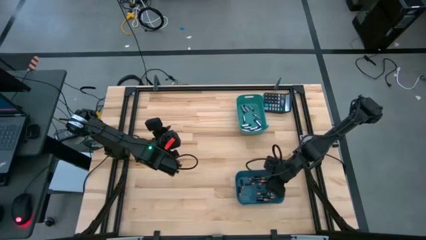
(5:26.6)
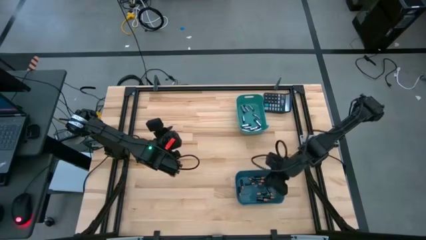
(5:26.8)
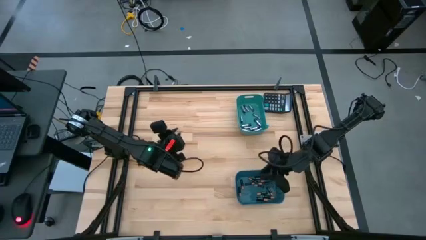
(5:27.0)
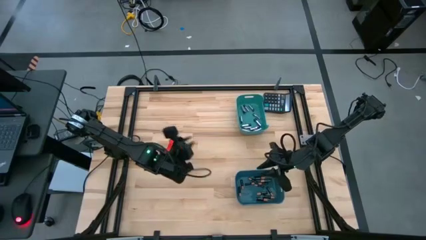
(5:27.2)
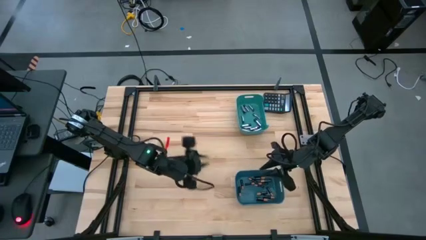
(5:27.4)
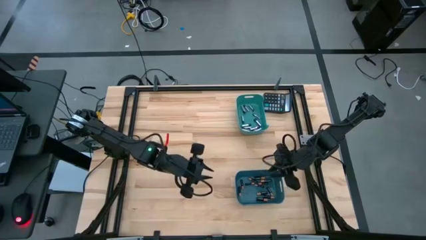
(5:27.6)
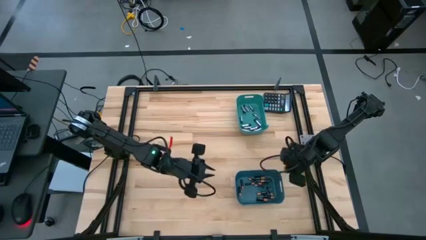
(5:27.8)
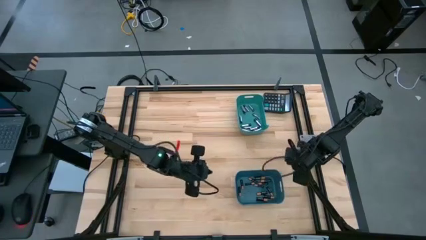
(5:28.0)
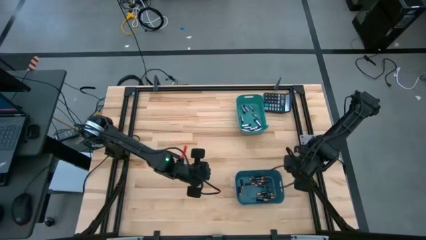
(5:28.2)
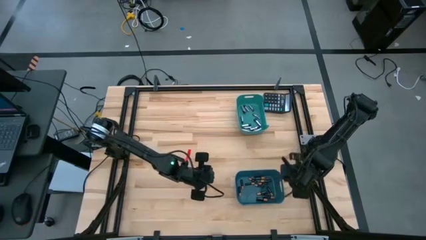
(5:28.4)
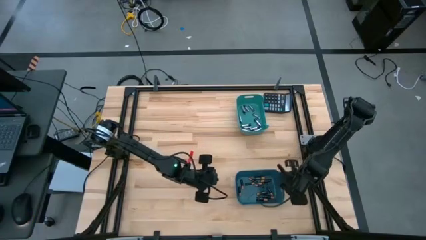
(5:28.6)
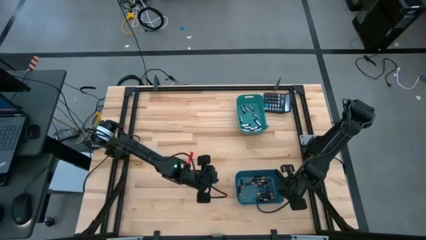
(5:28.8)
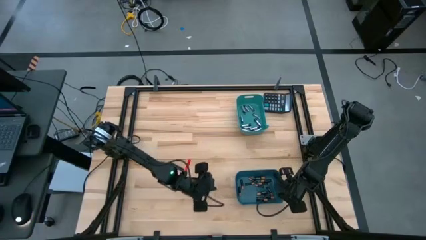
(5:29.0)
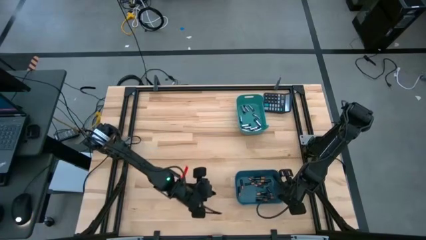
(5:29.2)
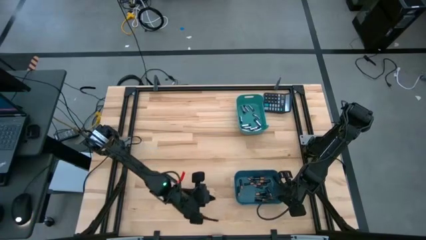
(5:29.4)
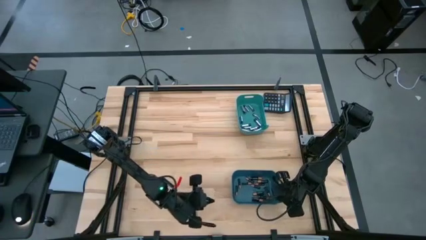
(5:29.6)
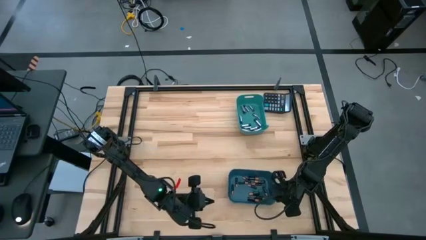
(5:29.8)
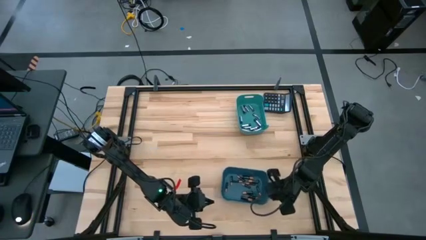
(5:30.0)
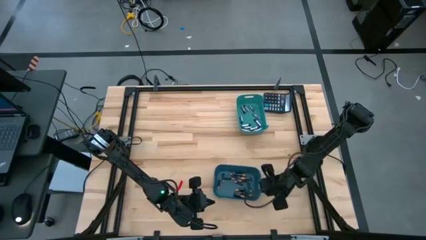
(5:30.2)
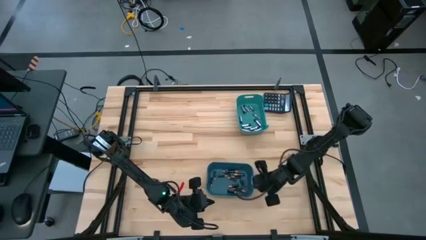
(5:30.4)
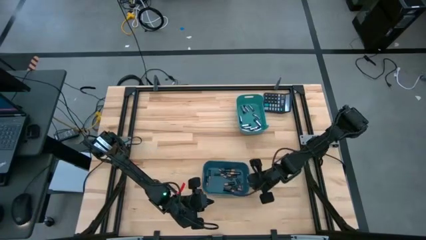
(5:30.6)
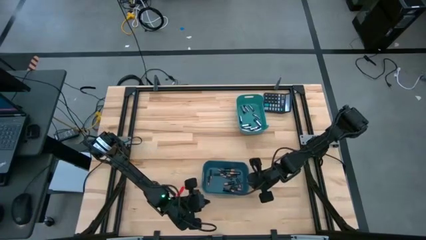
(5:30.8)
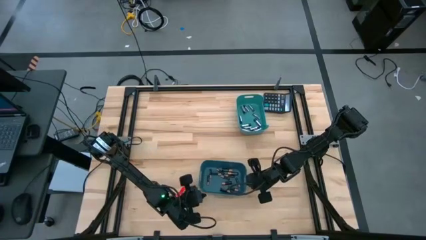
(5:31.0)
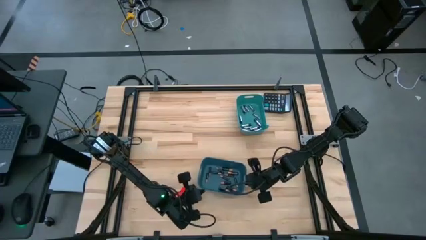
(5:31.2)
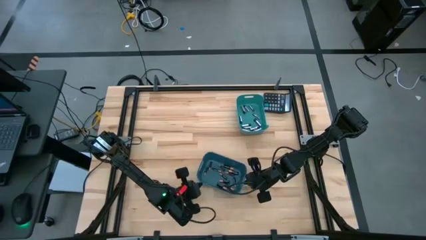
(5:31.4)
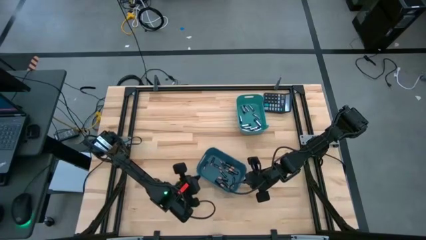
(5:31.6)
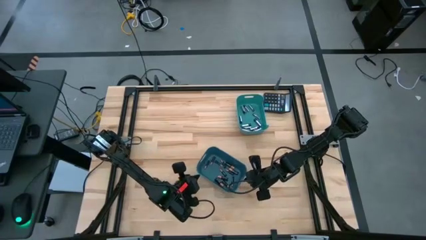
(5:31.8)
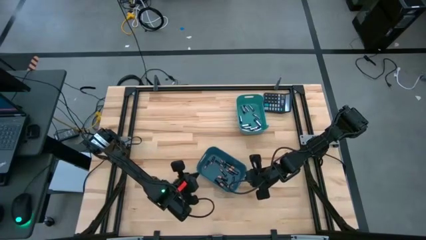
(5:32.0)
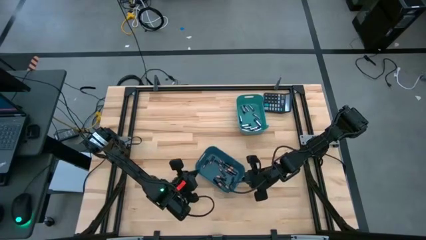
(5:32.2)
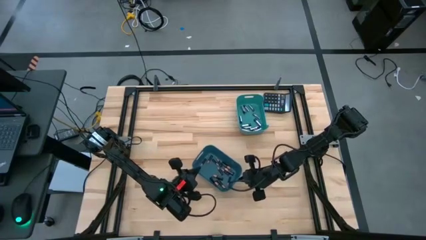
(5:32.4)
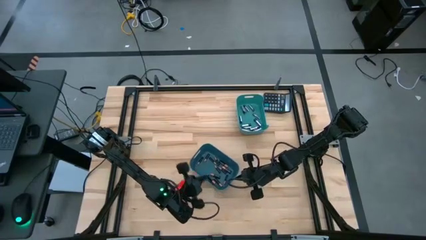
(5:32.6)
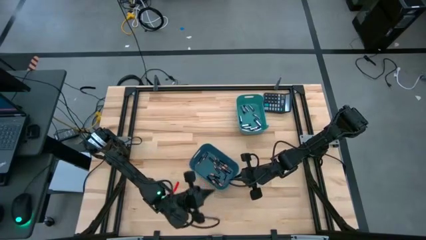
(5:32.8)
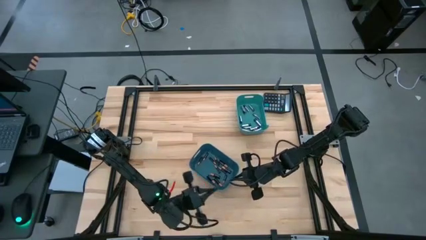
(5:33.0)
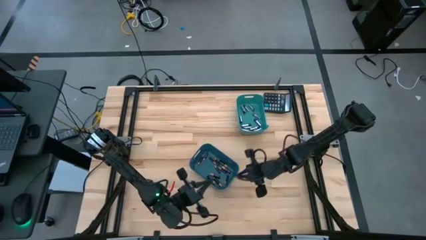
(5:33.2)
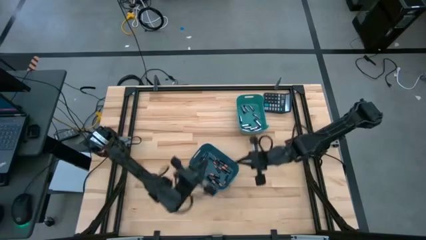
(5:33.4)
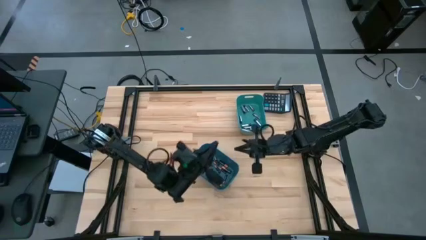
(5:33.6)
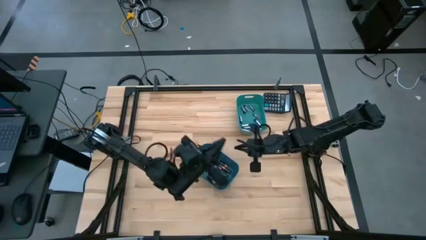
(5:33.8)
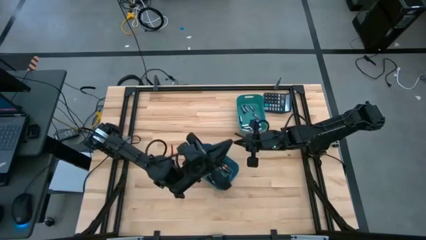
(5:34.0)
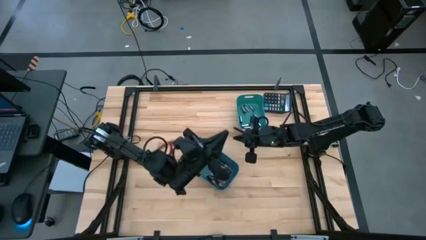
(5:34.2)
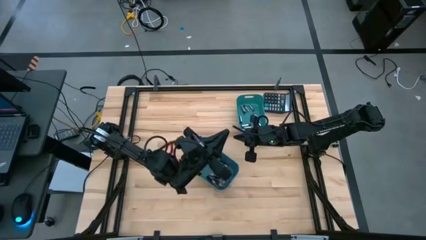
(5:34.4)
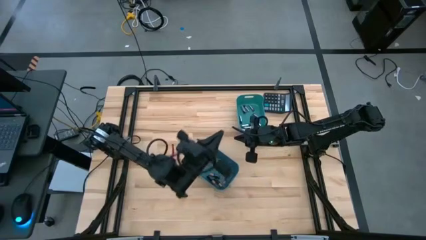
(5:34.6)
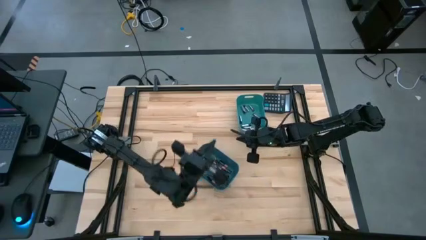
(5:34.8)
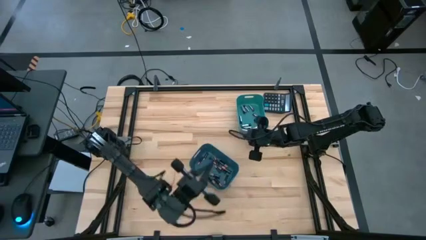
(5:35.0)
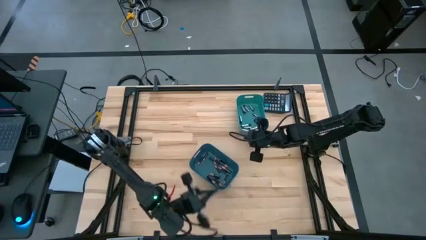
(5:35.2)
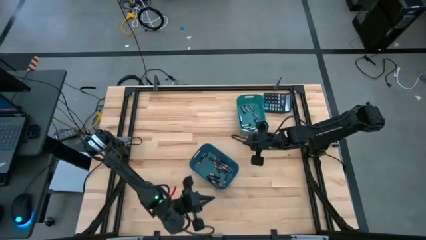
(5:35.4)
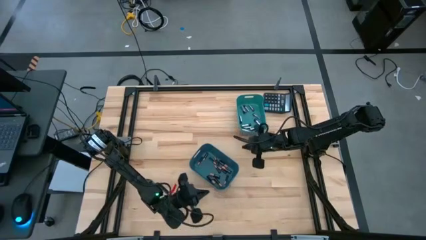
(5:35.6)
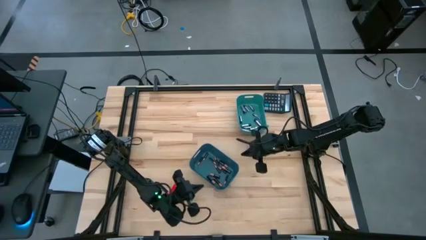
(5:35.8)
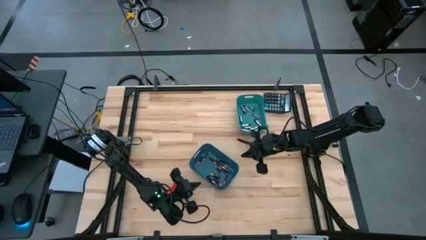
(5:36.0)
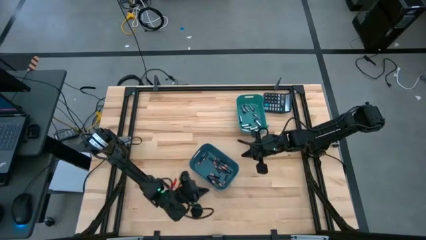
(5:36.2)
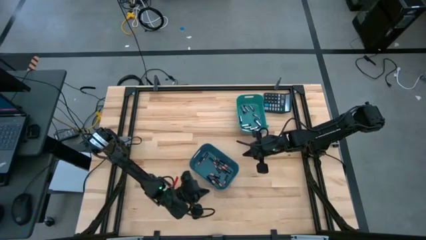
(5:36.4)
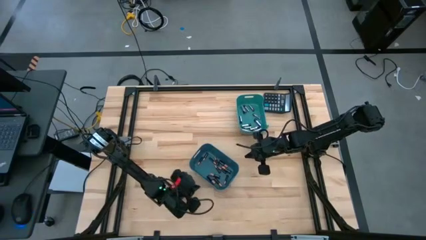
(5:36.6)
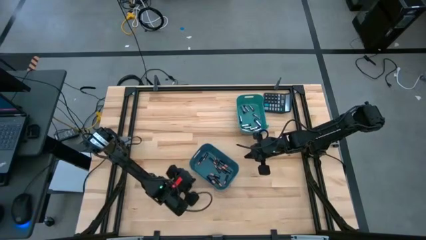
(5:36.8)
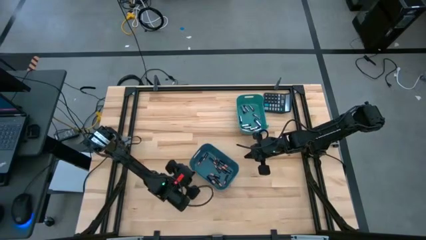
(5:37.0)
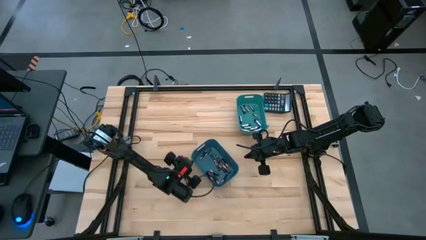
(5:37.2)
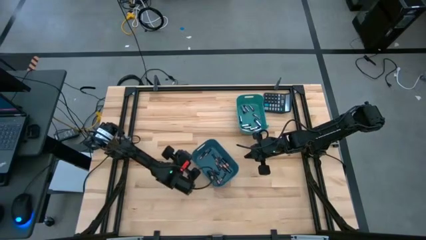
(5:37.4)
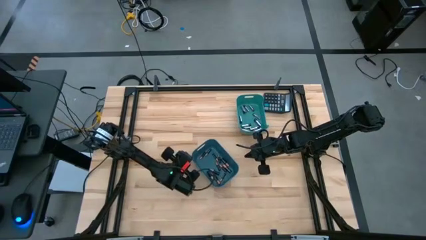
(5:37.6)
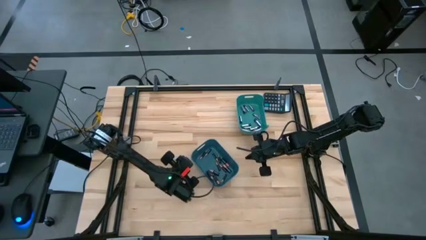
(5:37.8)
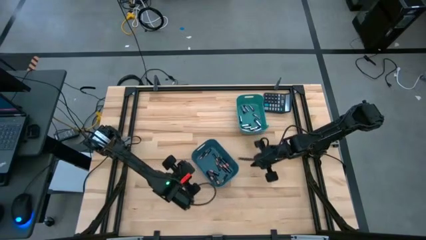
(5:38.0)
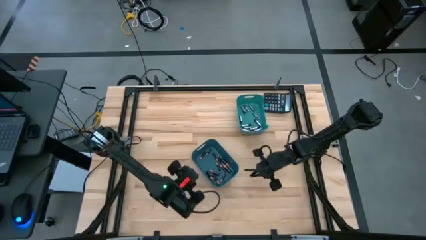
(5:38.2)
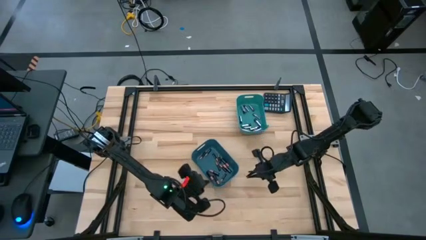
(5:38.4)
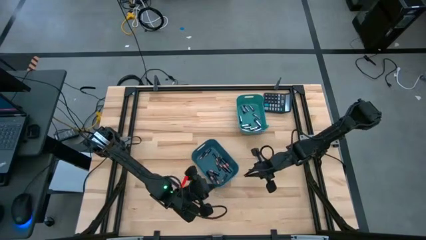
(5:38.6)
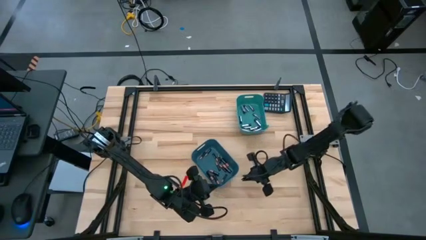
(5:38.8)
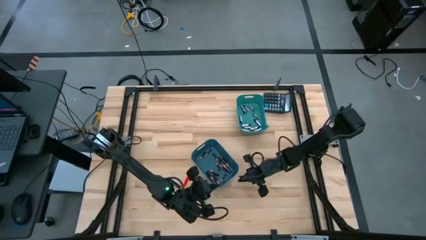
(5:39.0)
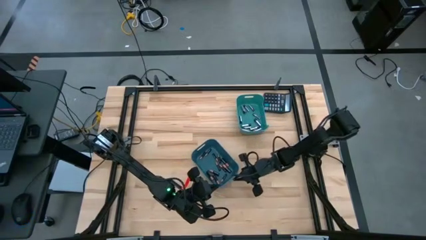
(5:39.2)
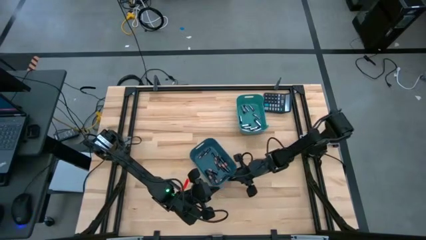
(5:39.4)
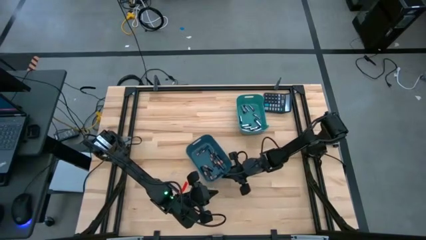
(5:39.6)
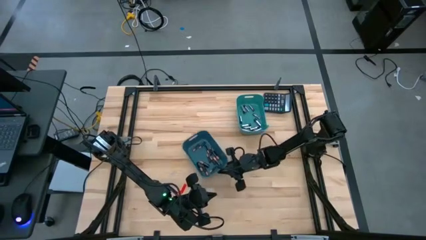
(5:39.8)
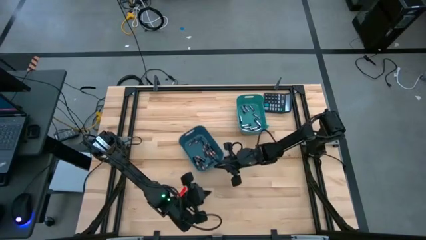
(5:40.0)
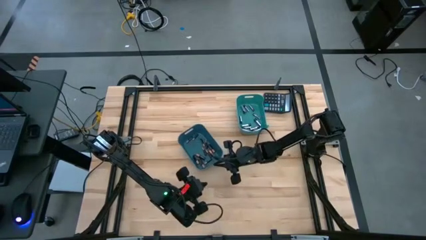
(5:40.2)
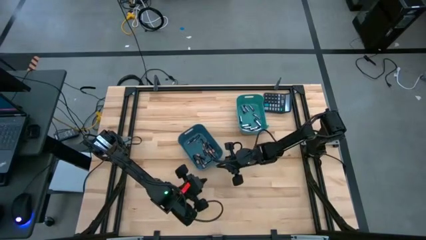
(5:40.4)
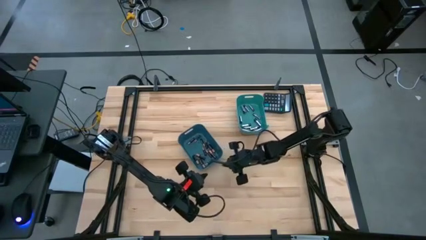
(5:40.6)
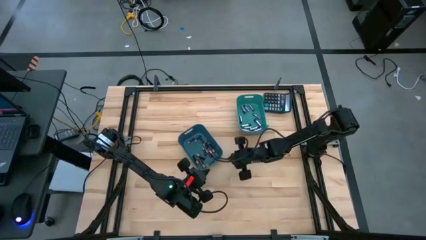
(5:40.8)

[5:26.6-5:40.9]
Task: Sort batteries
Move all the bins to the top corner of the table

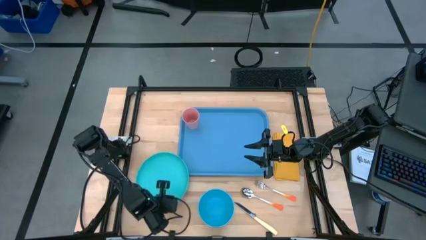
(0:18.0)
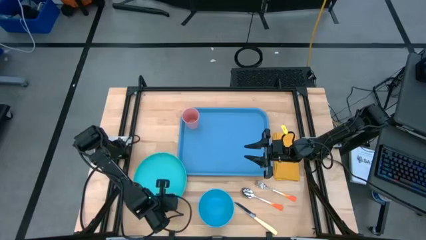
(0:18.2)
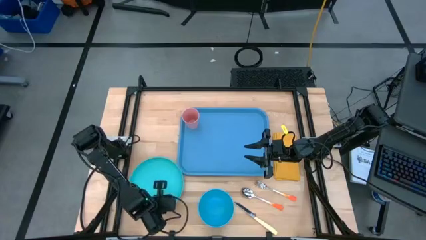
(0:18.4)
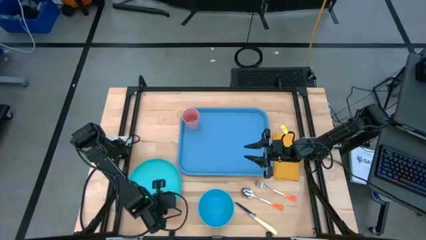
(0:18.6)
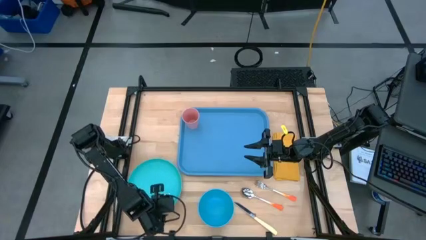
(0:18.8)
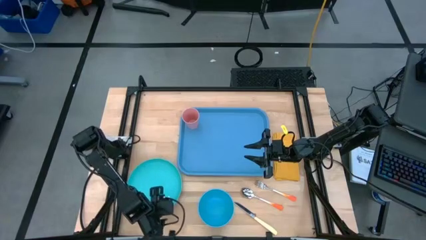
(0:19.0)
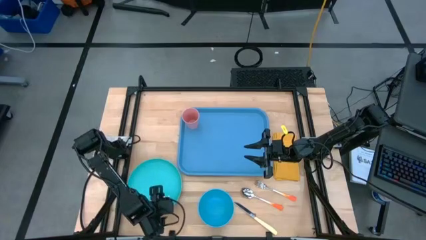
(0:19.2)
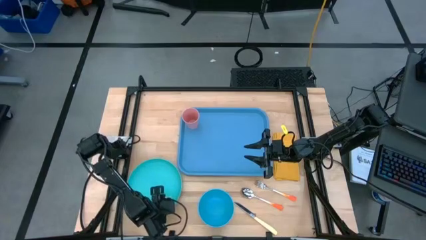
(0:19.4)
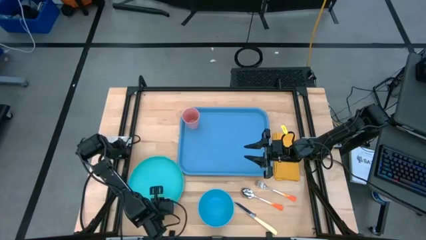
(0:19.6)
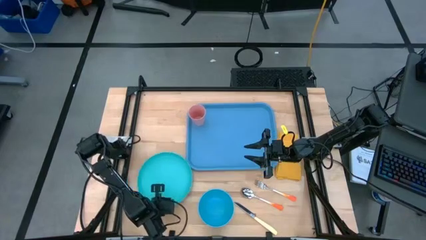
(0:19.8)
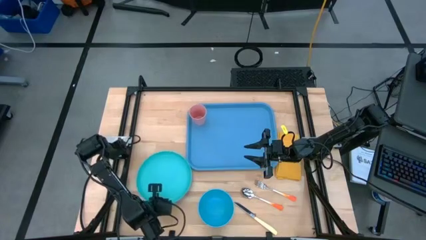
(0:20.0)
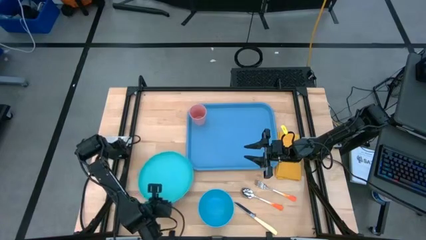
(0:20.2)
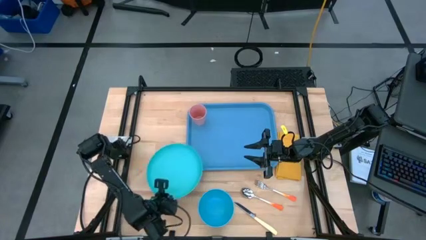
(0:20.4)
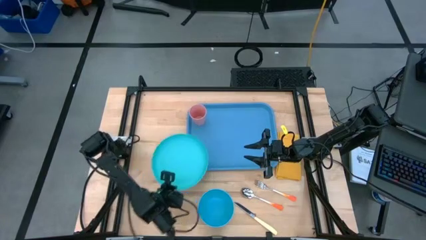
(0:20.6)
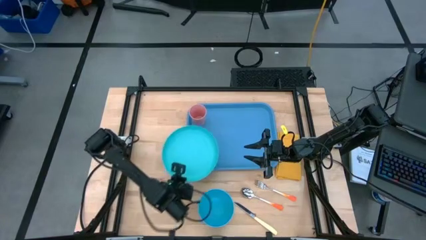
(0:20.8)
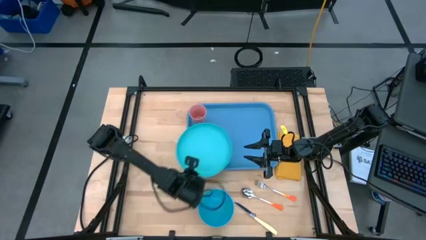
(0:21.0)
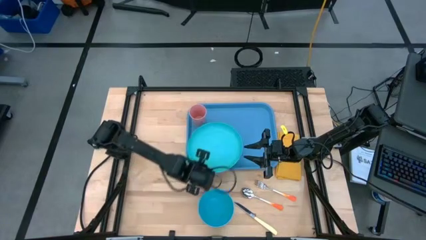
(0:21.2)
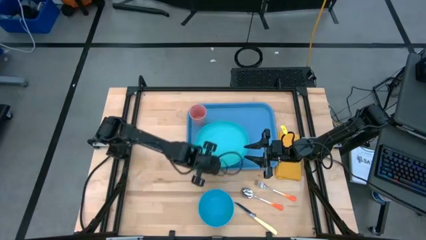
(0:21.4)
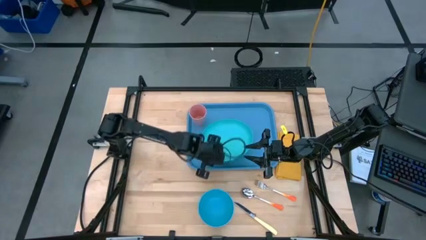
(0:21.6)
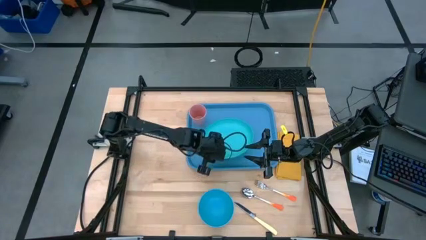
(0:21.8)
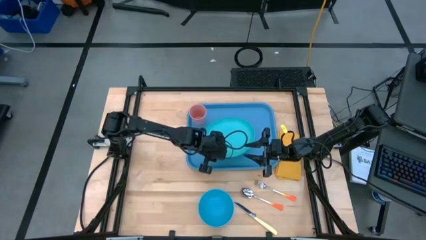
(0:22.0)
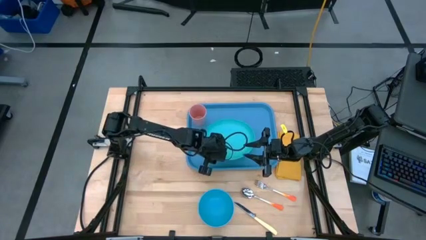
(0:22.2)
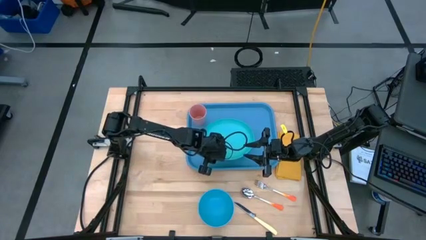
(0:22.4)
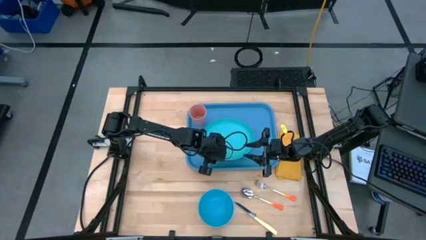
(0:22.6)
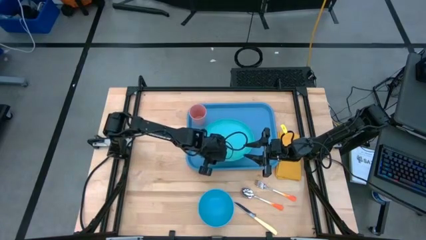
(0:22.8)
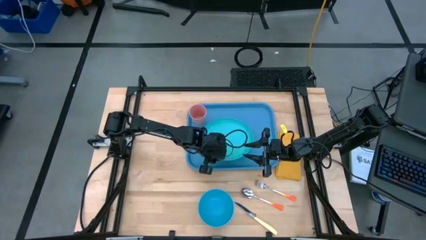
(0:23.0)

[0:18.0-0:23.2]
Task: Set up tray
Put the blue plate on the blue serving tray to the bottom right of the pink cup
